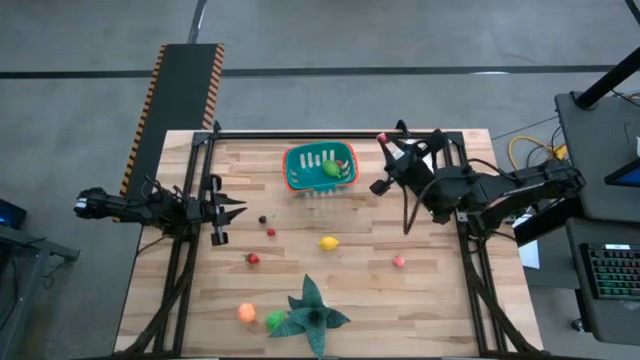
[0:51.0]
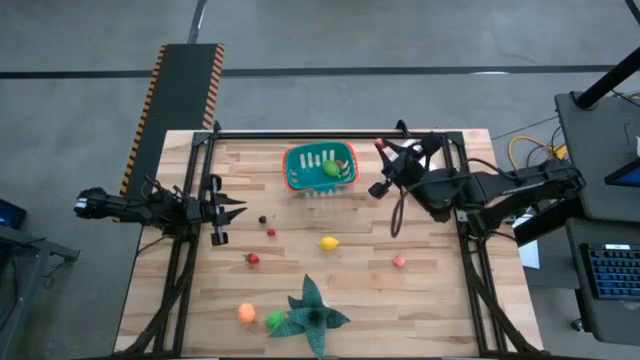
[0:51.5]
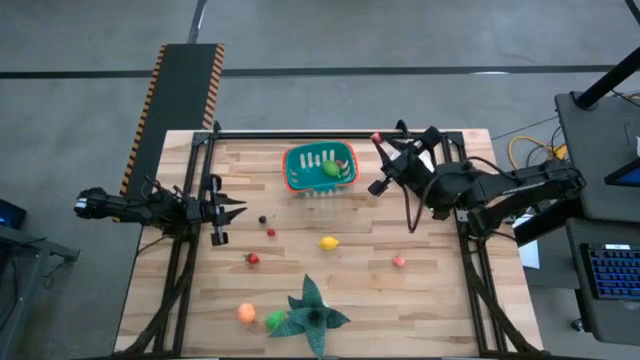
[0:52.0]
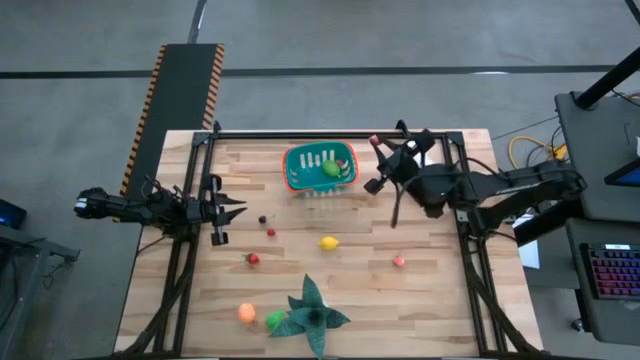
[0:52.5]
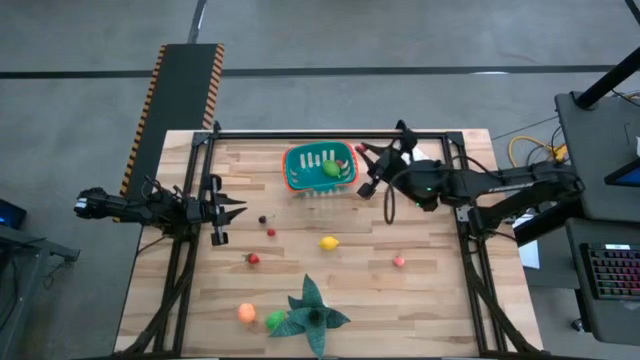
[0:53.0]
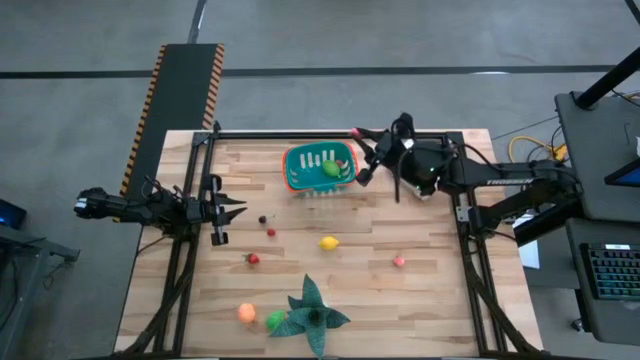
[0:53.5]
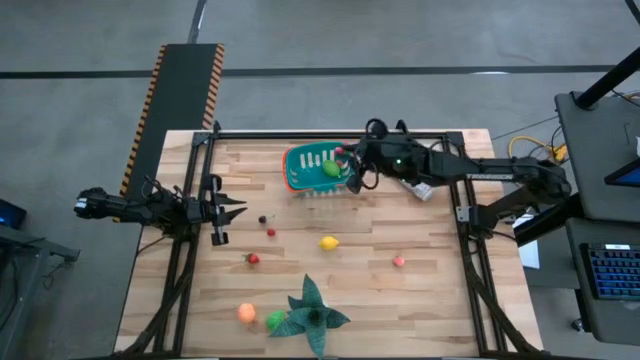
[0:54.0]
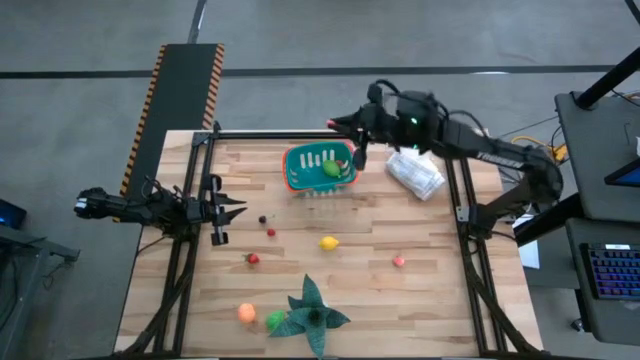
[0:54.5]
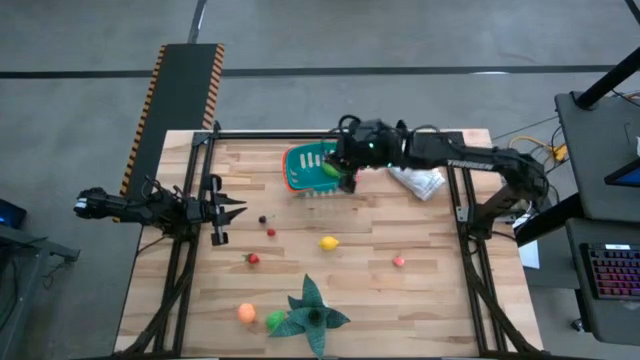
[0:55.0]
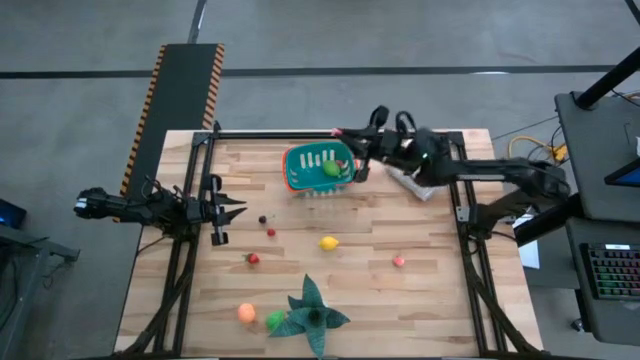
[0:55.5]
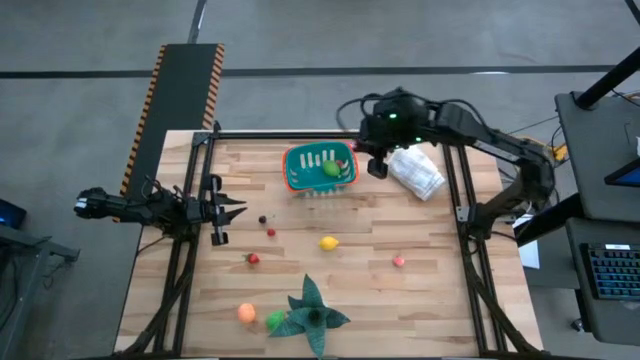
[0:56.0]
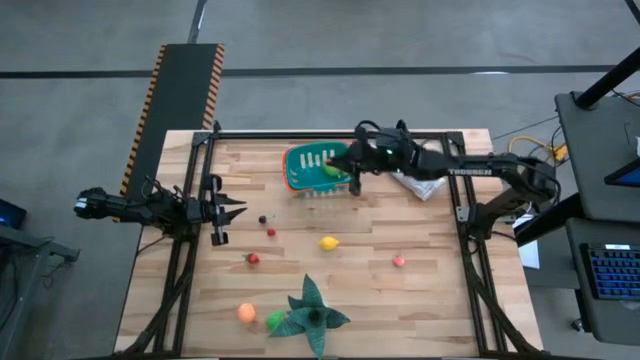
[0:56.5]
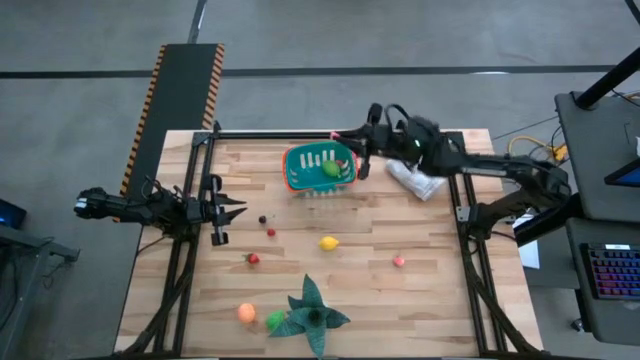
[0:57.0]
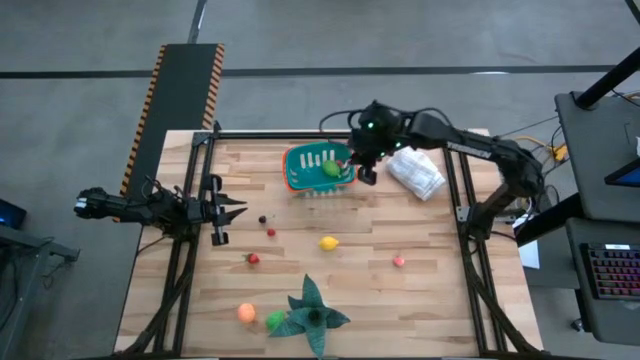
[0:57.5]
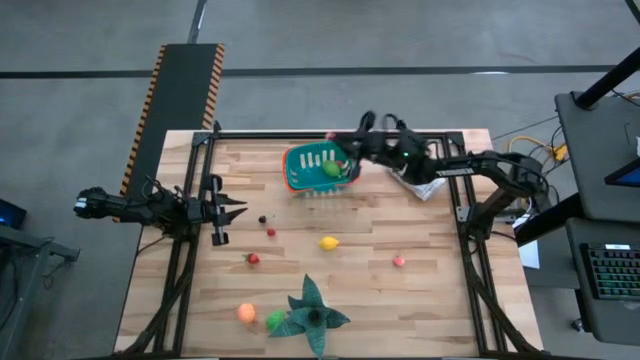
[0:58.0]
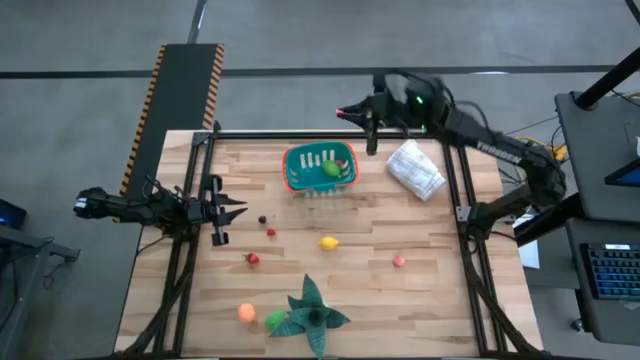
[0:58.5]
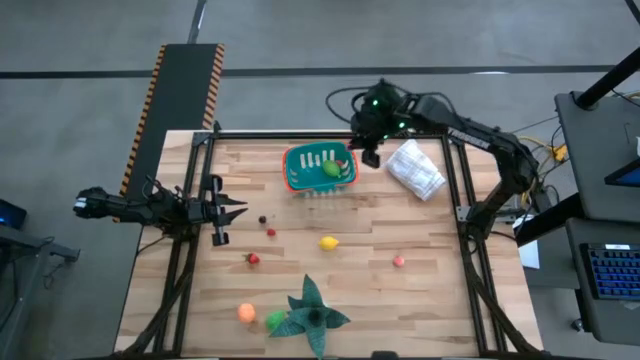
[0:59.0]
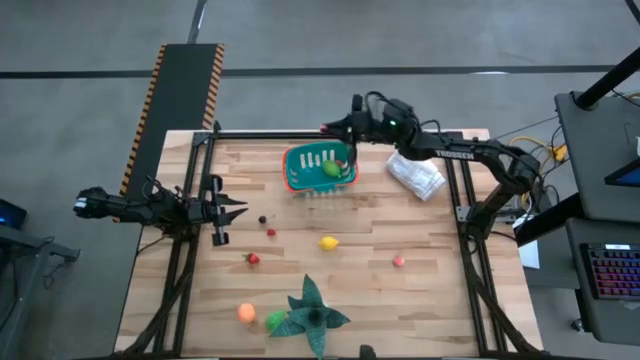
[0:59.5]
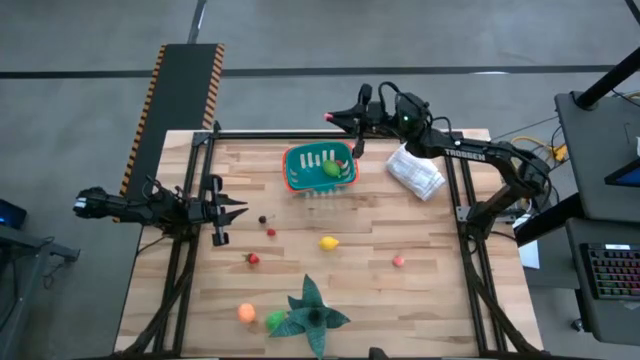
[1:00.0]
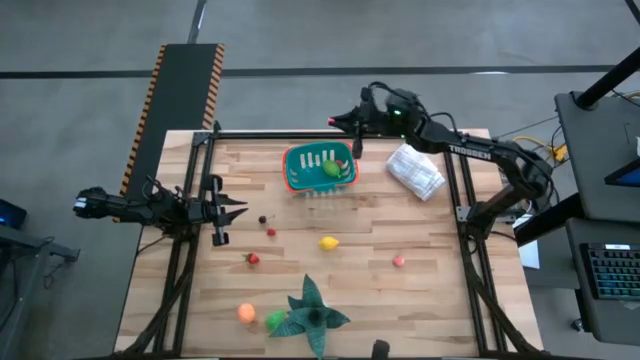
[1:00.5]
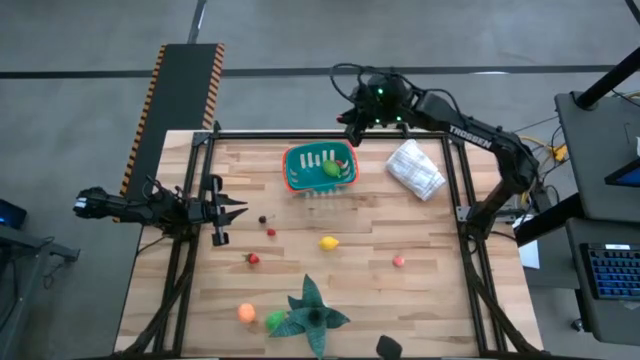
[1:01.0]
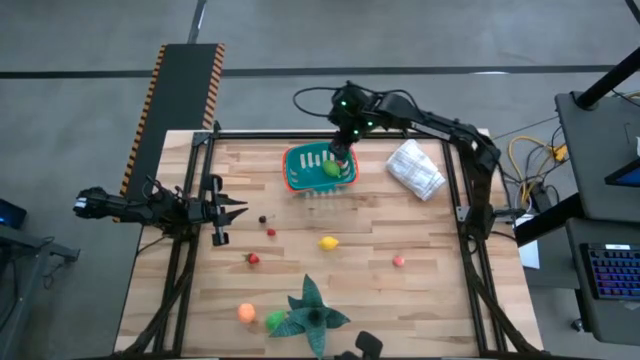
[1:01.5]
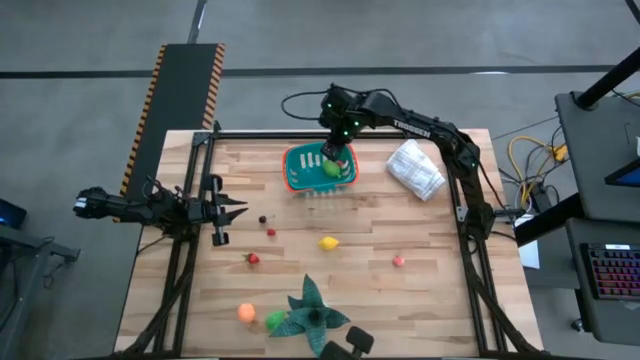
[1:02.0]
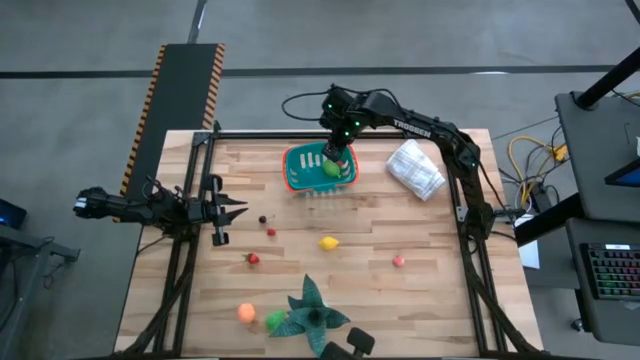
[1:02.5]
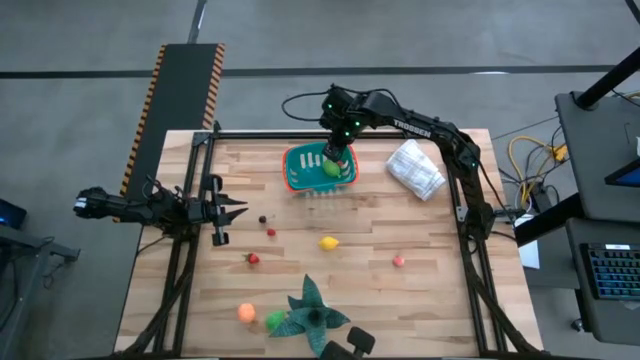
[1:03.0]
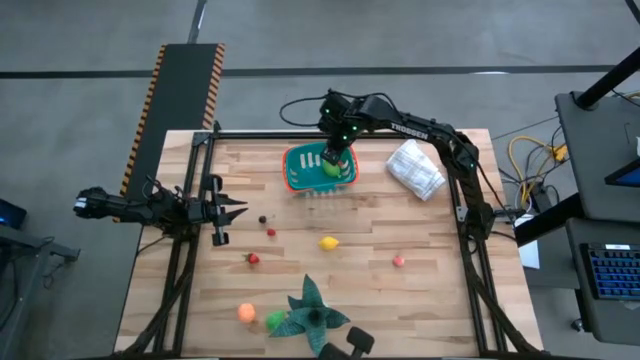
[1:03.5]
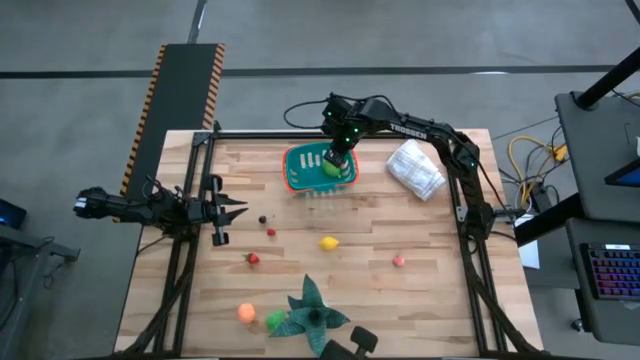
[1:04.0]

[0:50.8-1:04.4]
Task: Pick and placing Produce into tupperware
Put the peach toy into the bin
